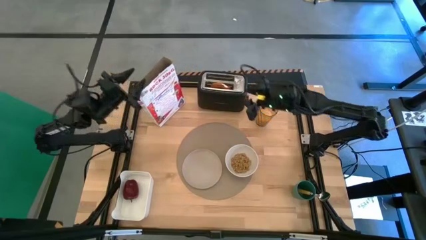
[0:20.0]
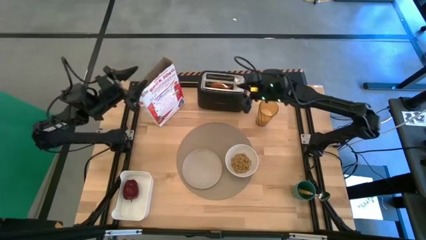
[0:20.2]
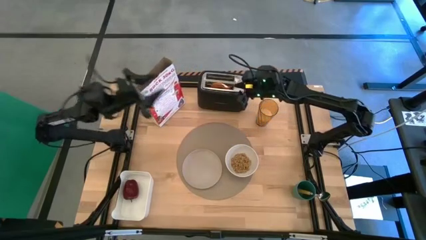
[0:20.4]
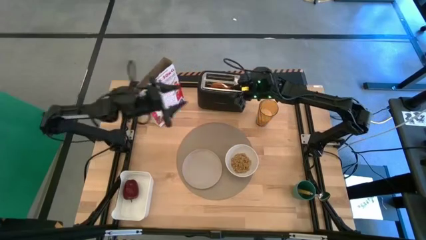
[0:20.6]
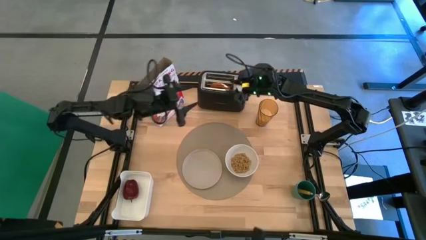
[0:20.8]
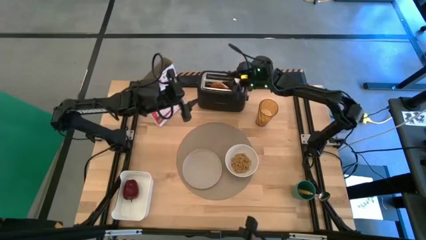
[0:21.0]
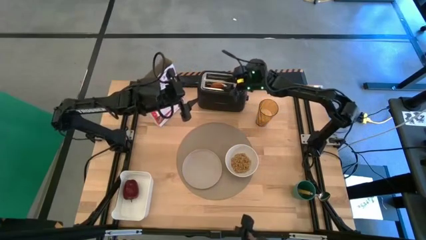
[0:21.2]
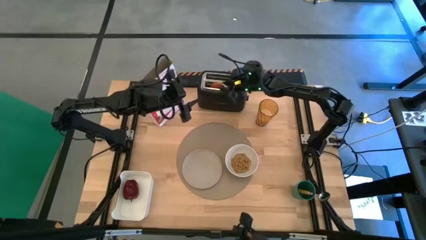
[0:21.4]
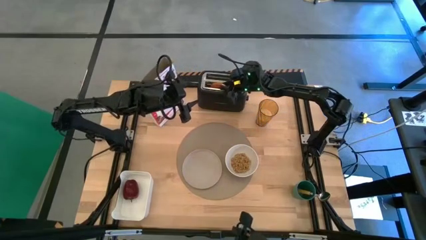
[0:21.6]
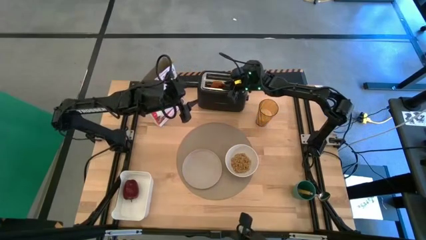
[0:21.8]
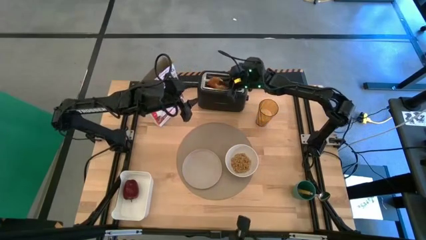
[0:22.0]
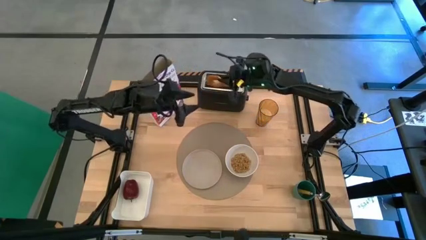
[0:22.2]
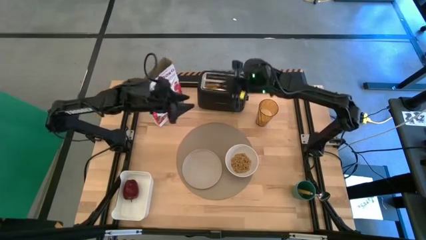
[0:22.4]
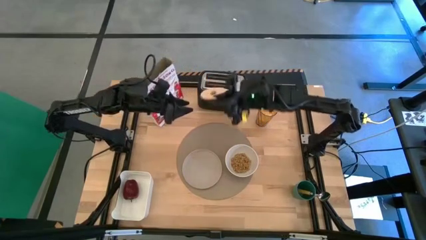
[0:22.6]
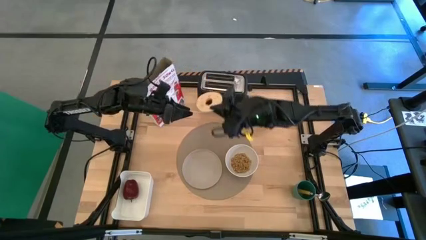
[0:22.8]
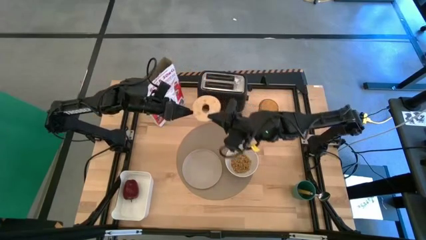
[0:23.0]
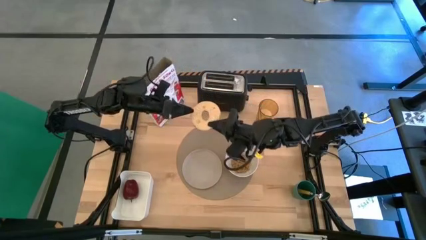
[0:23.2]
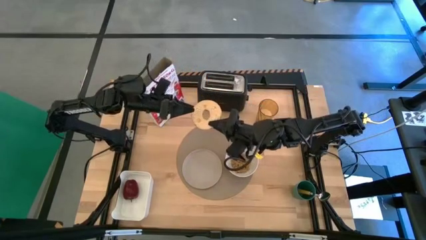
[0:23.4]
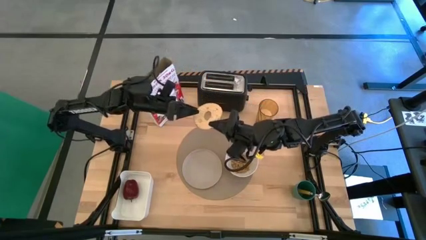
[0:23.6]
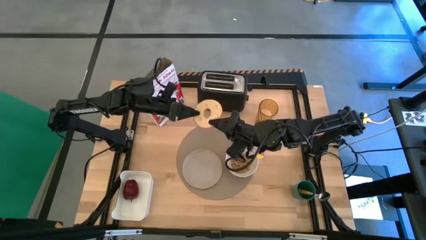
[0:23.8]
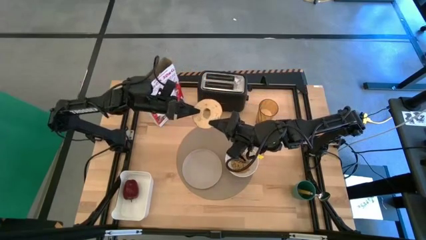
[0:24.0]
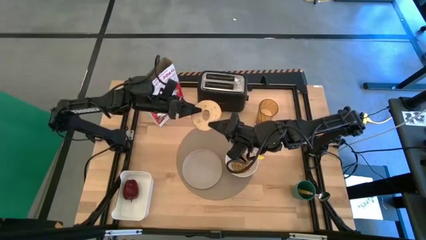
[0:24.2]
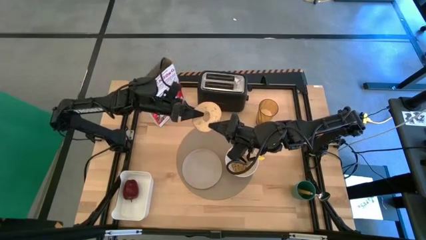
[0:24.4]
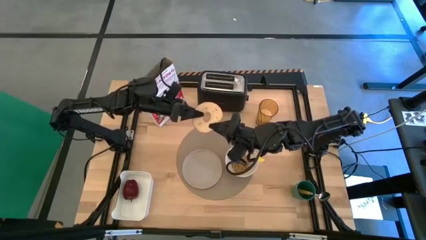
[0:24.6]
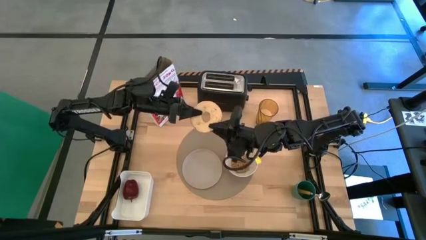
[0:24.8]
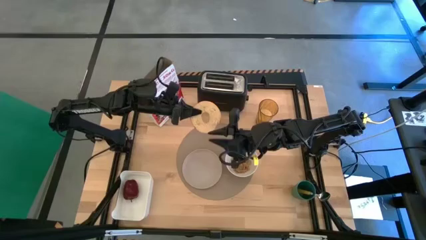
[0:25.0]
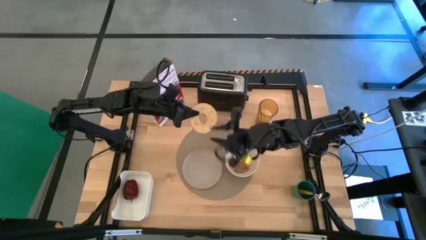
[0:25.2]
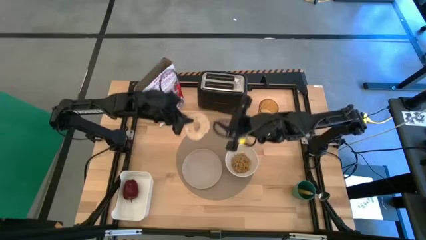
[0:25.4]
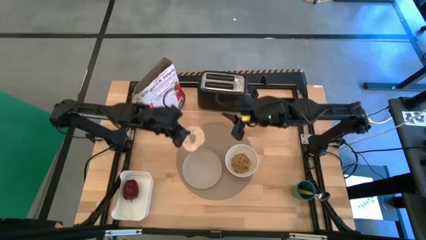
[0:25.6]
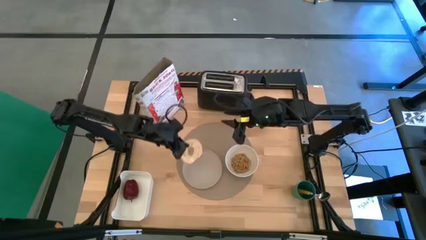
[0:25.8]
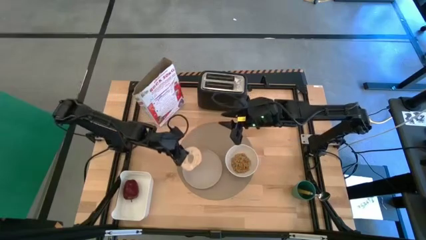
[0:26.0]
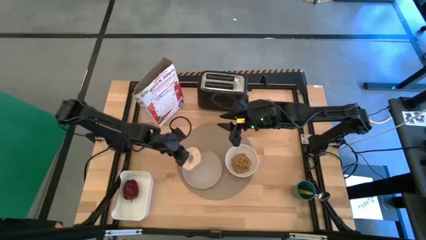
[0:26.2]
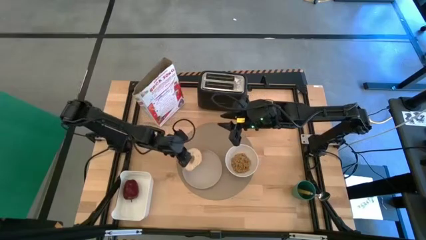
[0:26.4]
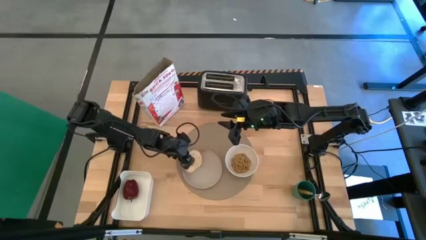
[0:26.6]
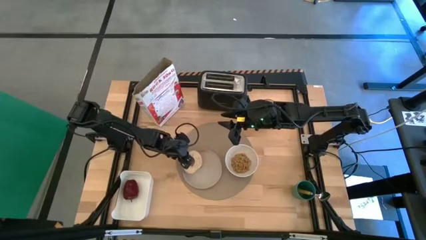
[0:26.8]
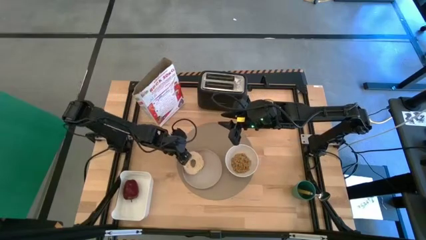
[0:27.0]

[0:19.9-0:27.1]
Task: Arrange a breakfast setting
Put the toasted bagel from the toaster on the gray plate

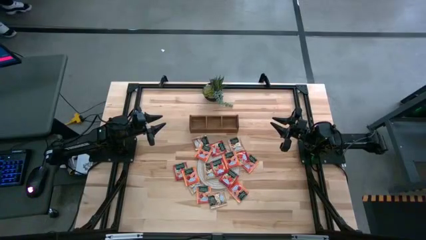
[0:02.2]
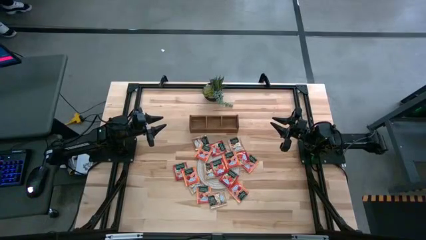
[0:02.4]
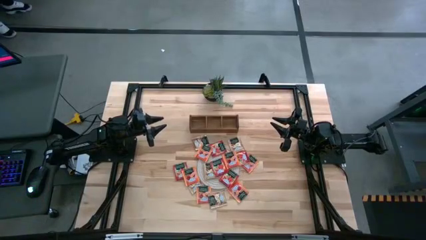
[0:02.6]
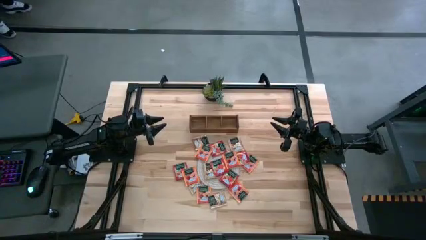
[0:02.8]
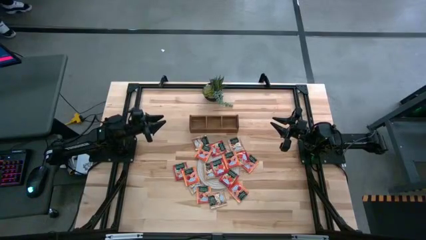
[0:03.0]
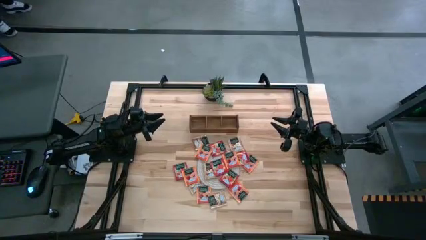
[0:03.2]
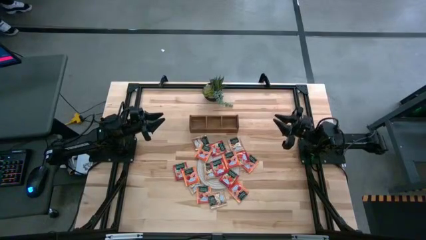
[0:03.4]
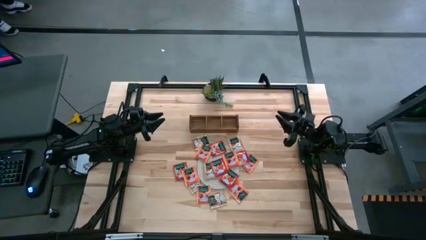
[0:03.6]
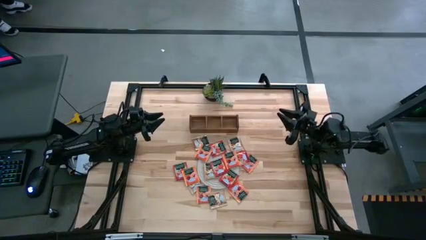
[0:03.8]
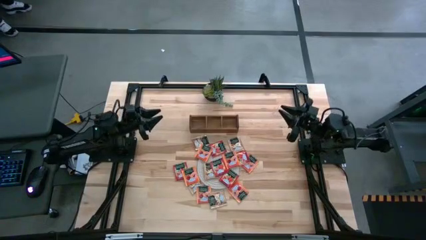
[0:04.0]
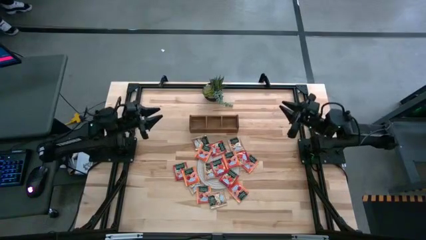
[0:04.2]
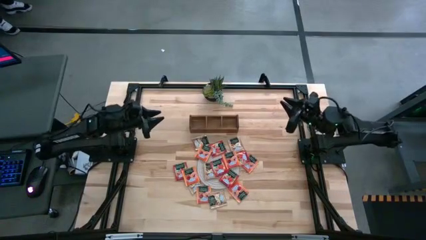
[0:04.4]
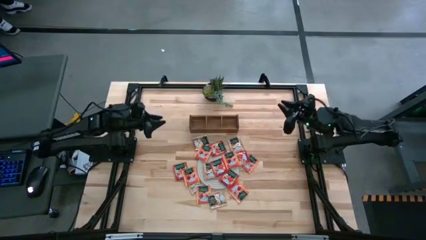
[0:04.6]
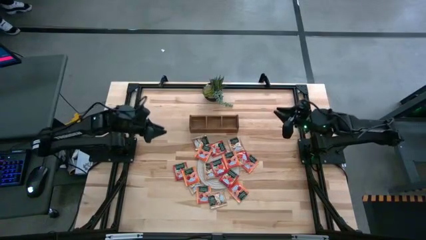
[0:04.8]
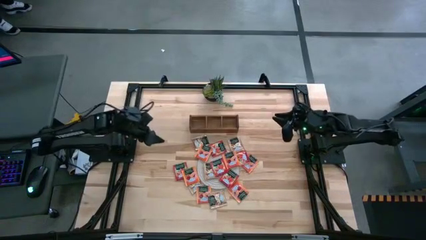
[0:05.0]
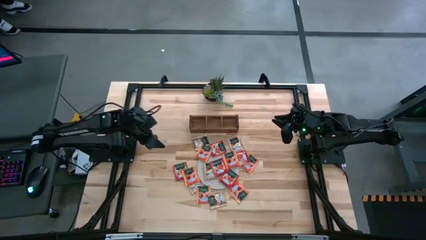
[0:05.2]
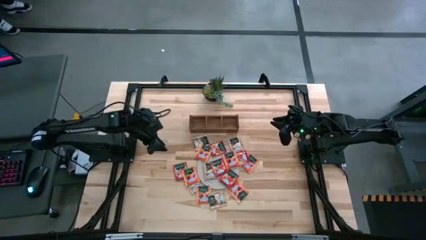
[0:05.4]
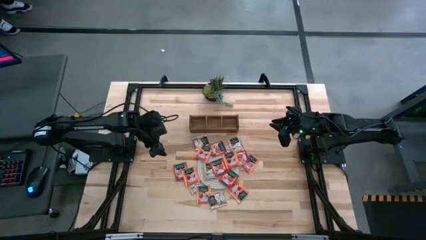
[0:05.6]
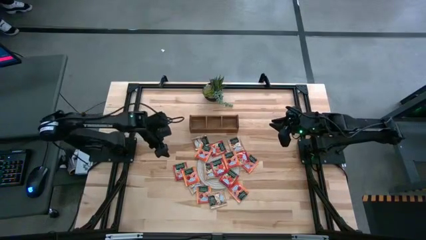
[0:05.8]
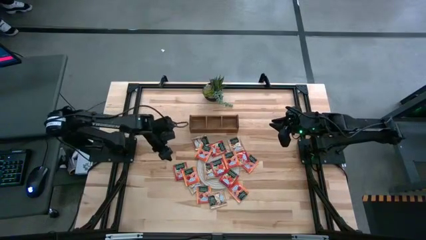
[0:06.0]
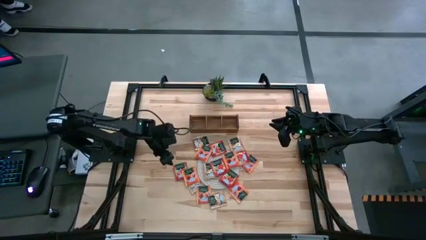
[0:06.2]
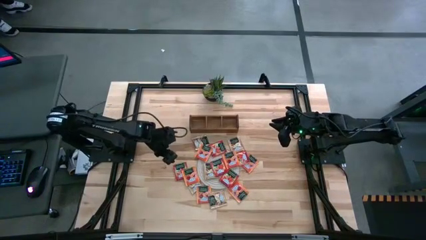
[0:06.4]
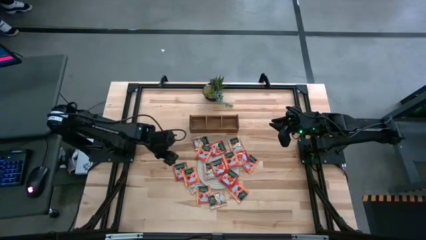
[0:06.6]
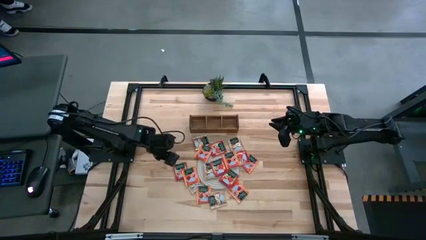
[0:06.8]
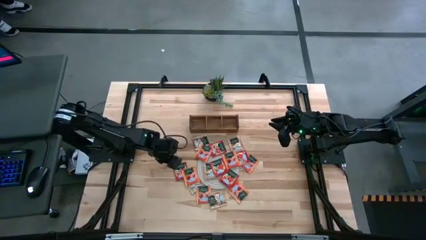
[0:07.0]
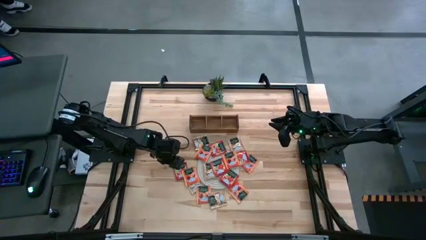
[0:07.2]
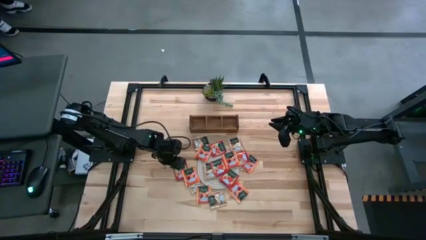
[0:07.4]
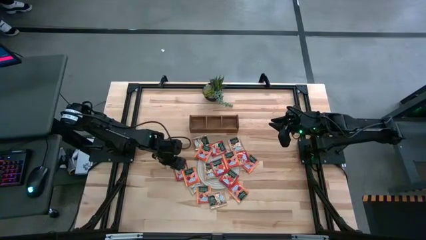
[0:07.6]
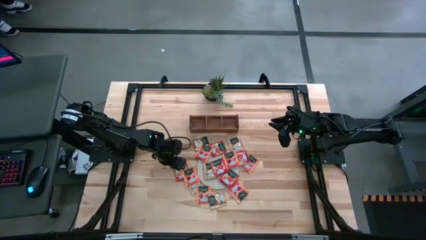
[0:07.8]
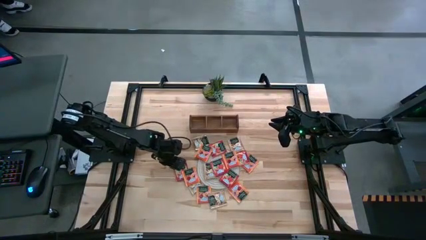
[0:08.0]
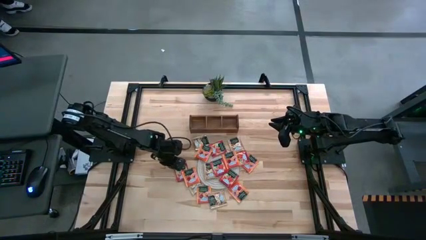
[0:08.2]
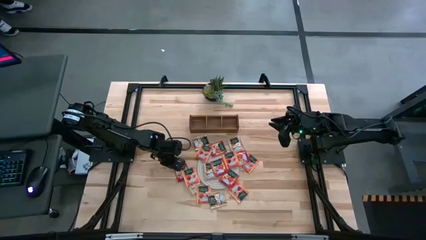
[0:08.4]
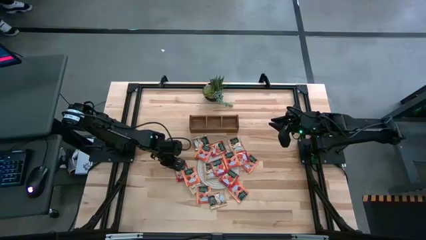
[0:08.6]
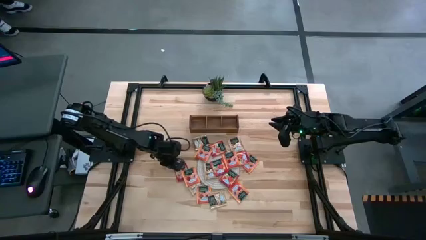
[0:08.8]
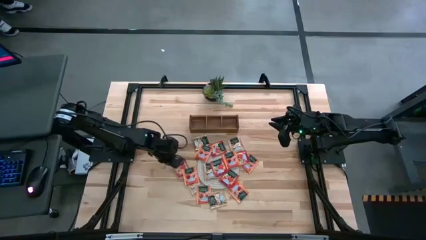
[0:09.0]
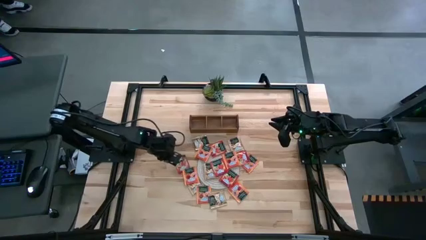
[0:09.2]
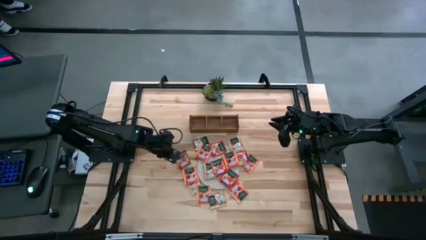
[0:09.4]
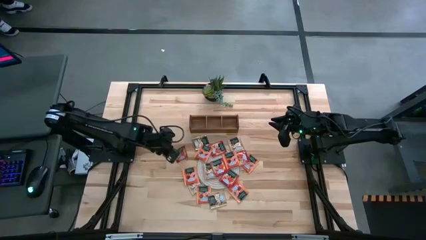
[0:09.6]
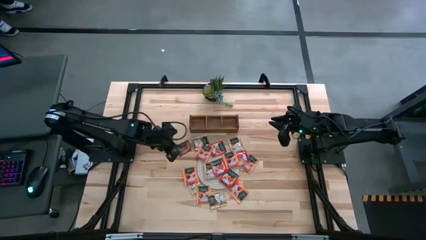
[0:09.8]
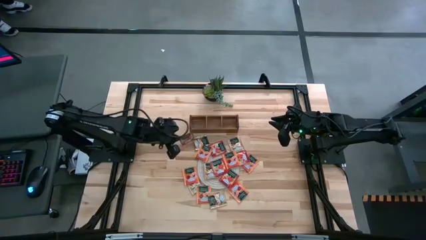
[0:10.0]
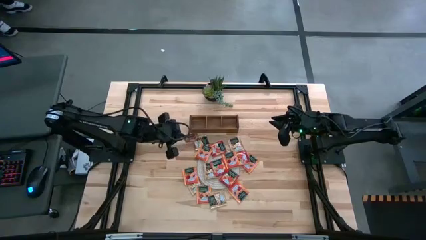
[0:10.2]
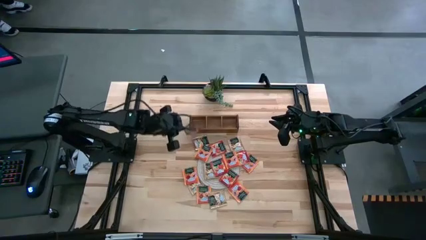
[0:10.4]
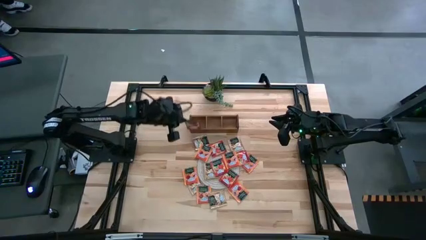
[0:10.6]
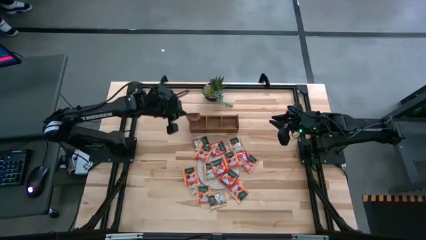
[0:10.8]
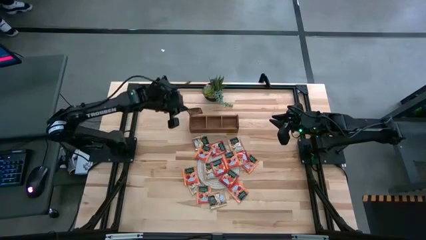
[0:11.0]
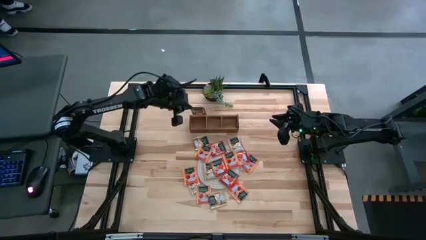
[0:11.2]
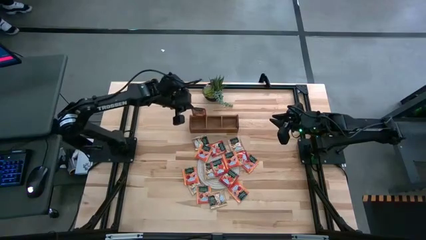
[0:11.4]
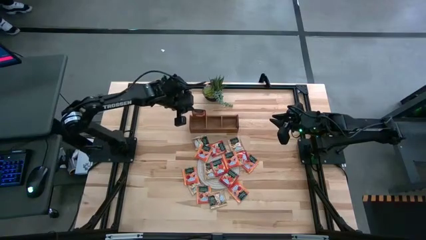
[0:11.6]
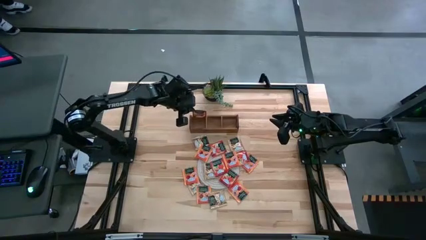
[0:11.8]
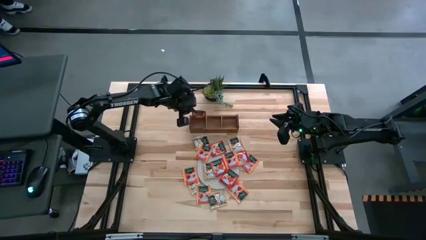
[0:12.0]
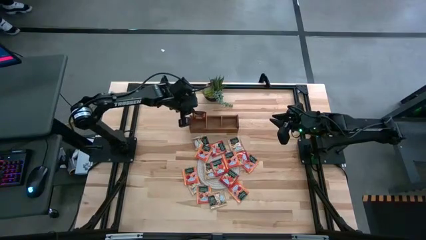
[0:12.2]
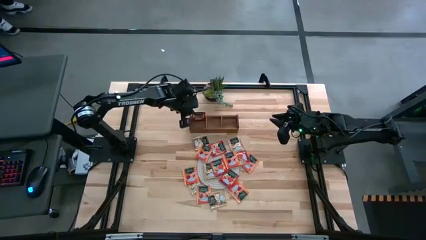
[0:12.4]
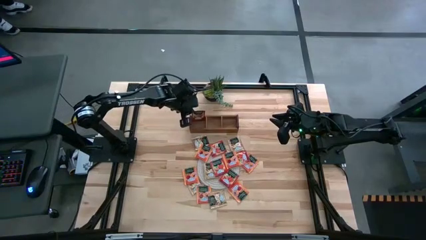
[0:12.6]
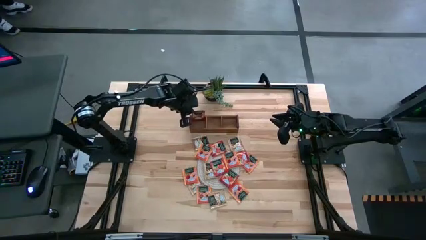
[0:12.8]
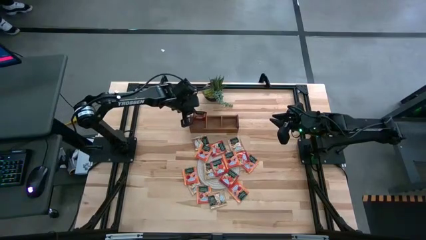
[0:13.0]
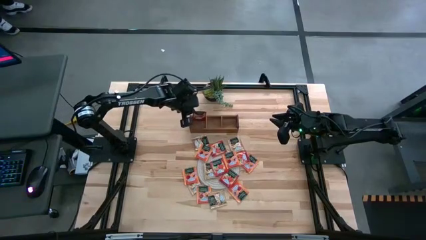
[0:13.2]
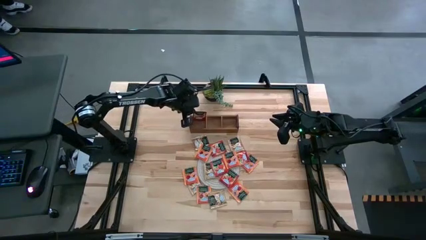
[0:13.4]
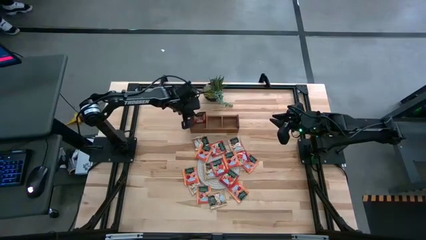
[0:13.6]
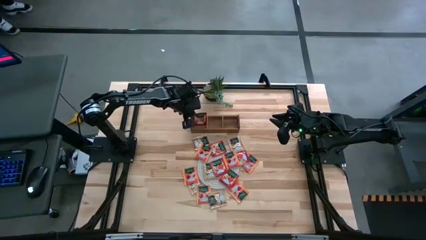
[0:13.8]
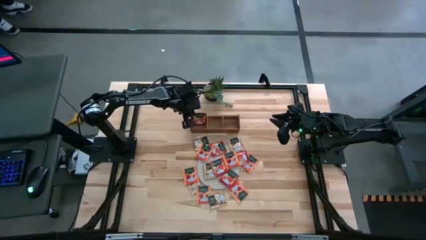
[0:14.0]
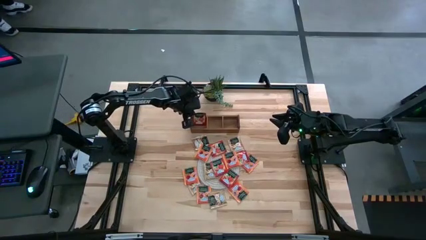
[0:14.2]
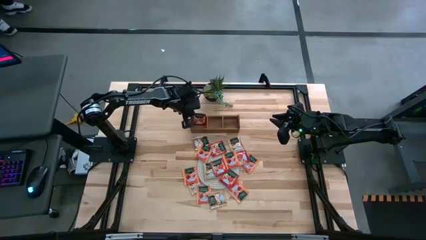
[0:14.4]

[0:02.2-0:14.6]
Task: Pick & Place Tea
Put the red tea bag into the left section of the wooden organizer
